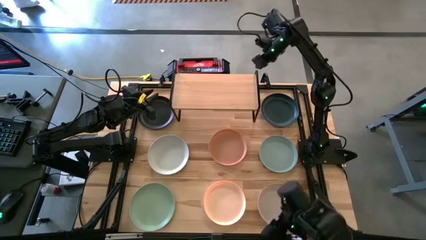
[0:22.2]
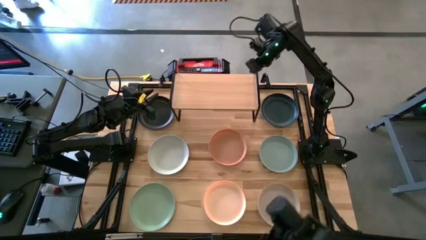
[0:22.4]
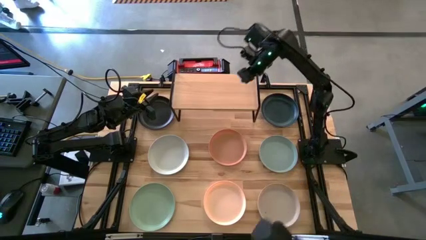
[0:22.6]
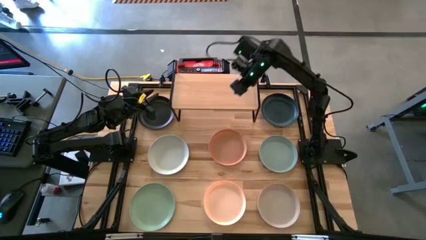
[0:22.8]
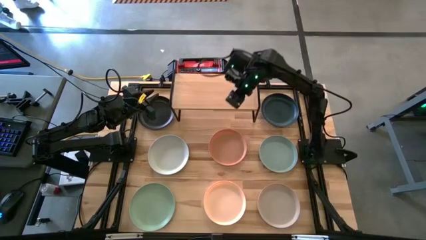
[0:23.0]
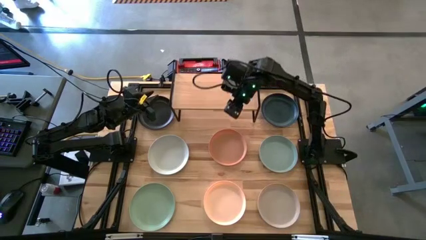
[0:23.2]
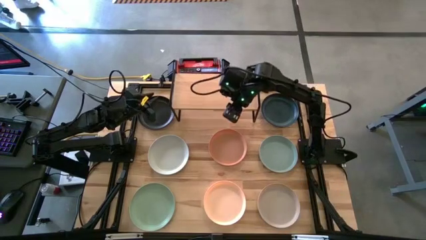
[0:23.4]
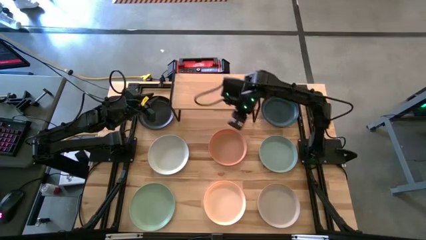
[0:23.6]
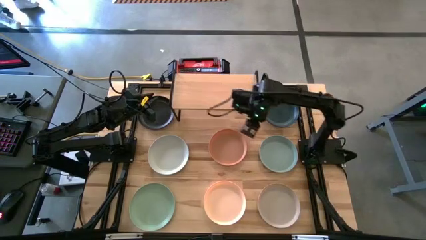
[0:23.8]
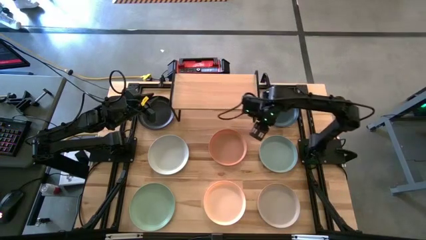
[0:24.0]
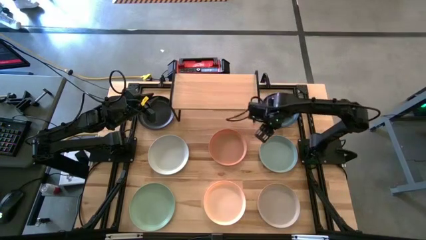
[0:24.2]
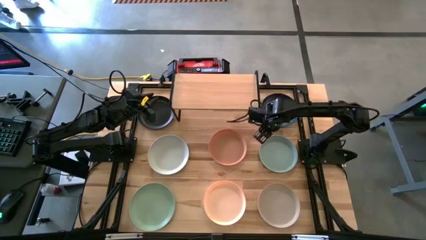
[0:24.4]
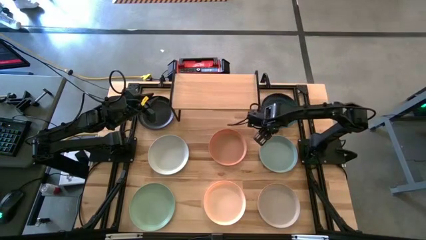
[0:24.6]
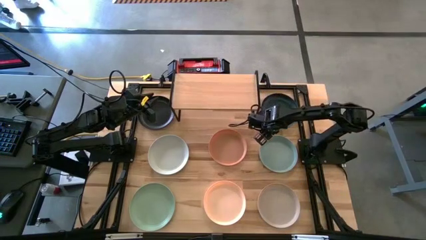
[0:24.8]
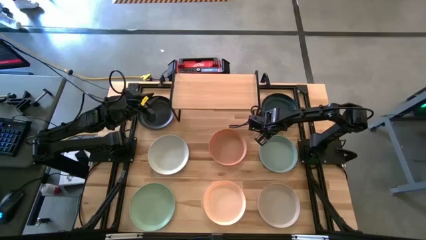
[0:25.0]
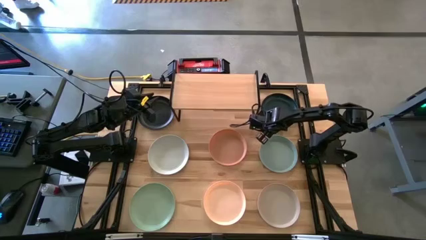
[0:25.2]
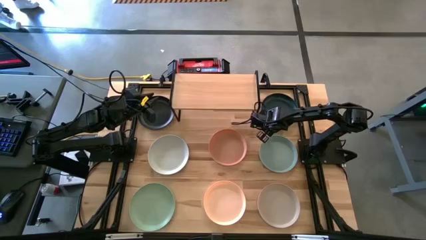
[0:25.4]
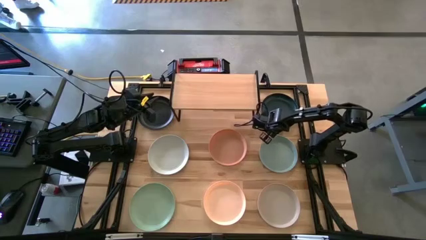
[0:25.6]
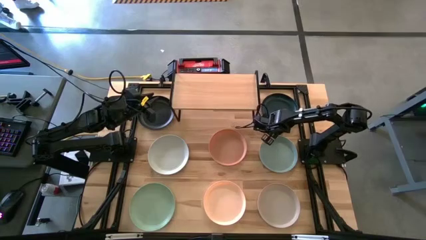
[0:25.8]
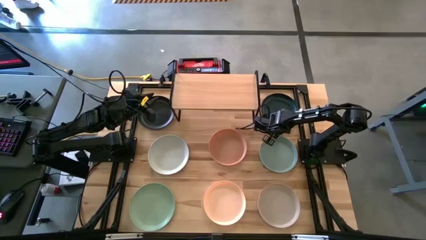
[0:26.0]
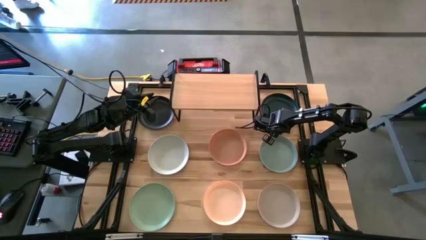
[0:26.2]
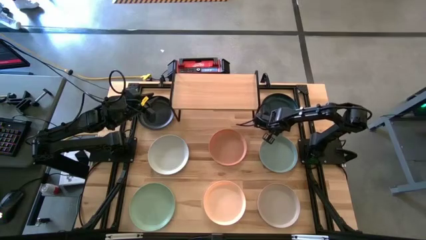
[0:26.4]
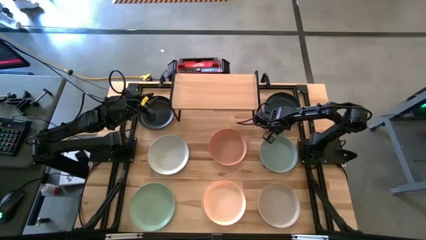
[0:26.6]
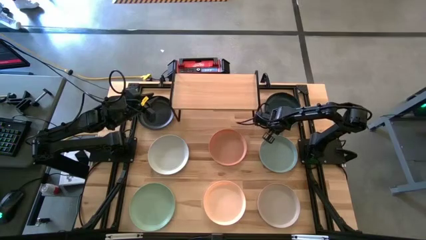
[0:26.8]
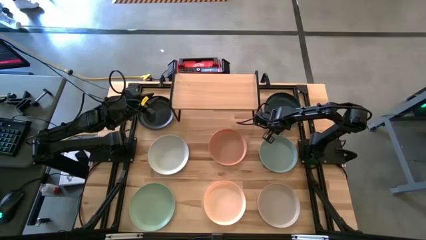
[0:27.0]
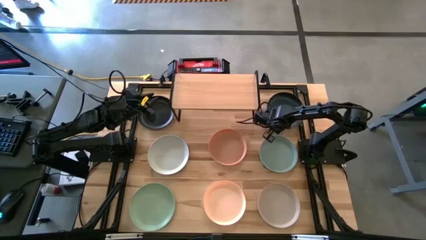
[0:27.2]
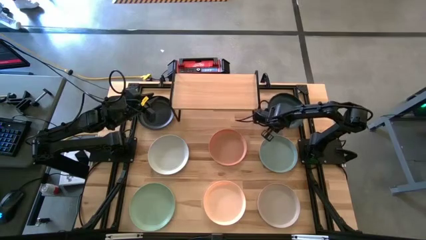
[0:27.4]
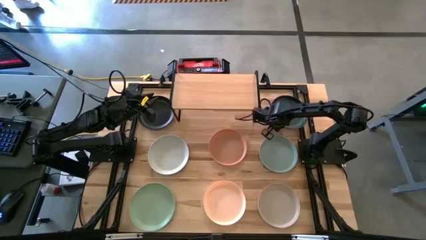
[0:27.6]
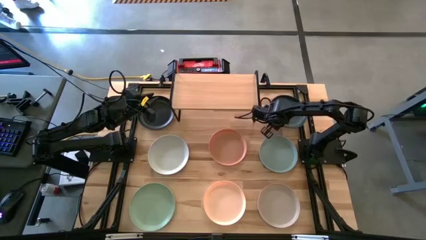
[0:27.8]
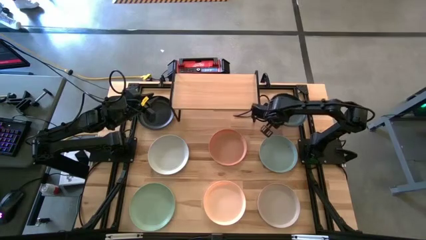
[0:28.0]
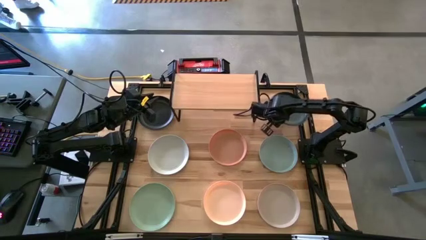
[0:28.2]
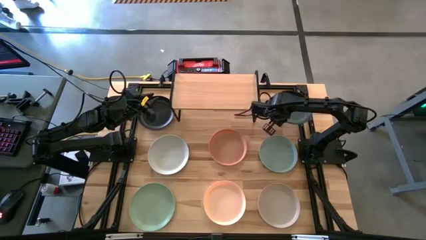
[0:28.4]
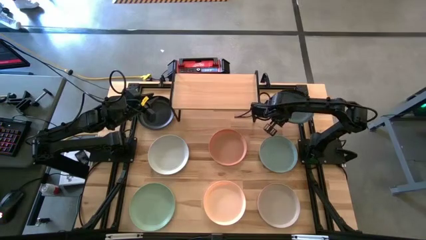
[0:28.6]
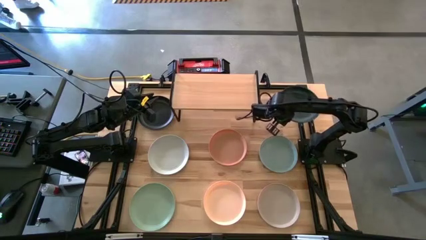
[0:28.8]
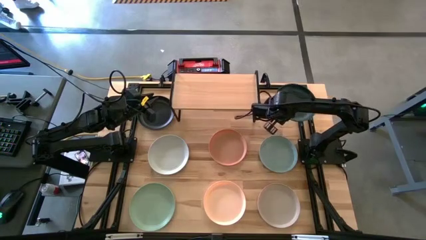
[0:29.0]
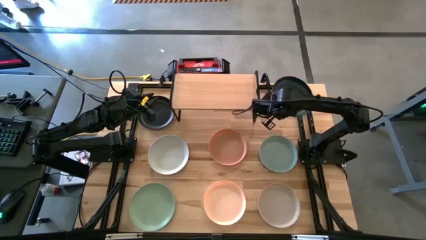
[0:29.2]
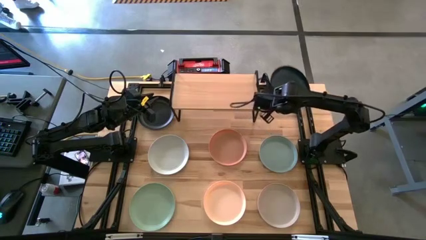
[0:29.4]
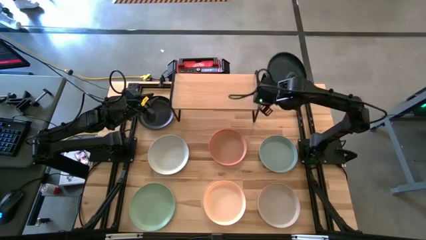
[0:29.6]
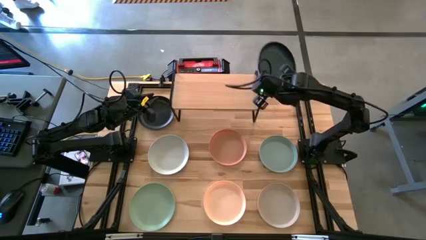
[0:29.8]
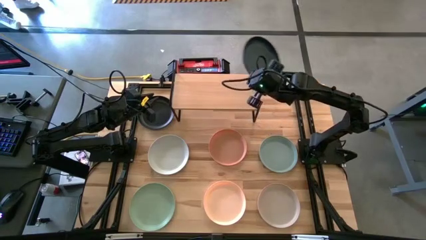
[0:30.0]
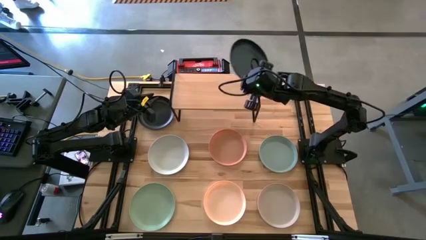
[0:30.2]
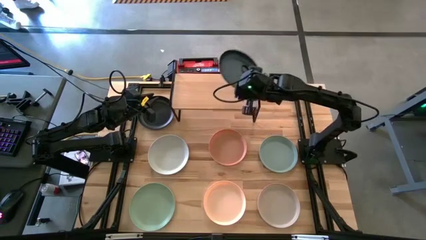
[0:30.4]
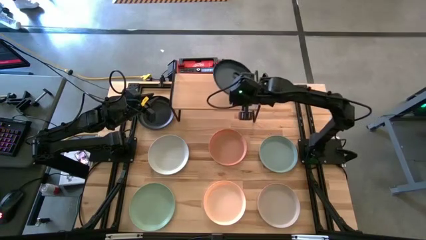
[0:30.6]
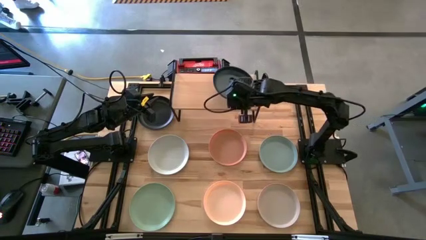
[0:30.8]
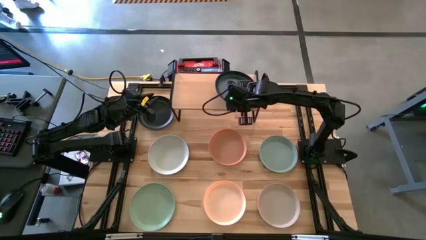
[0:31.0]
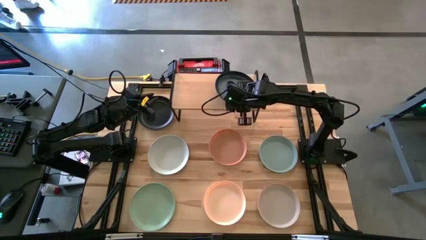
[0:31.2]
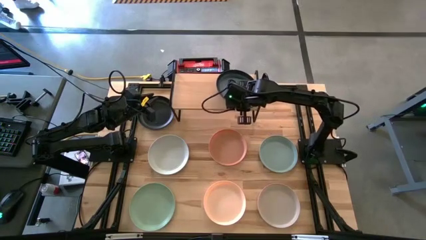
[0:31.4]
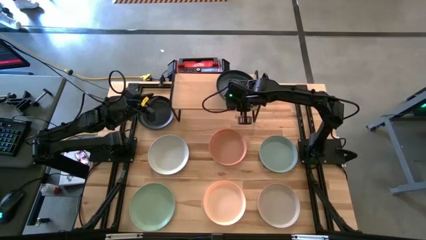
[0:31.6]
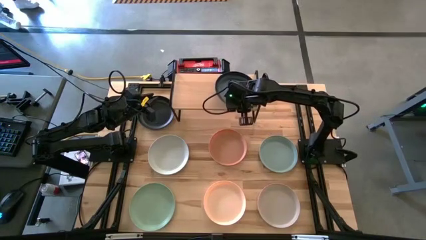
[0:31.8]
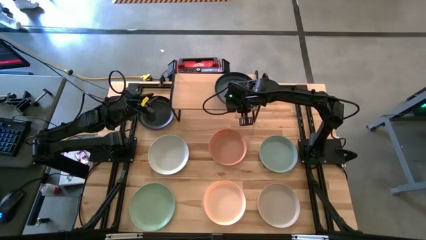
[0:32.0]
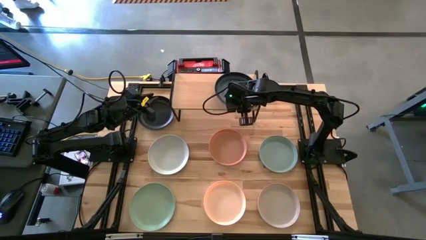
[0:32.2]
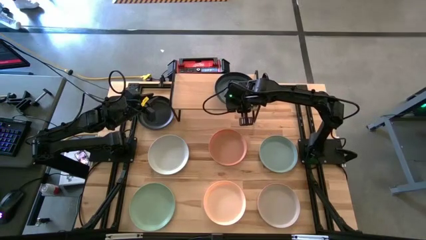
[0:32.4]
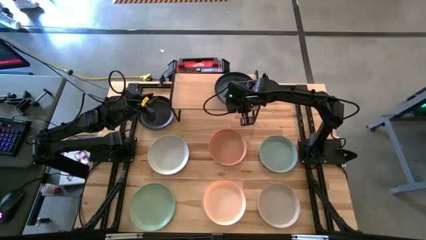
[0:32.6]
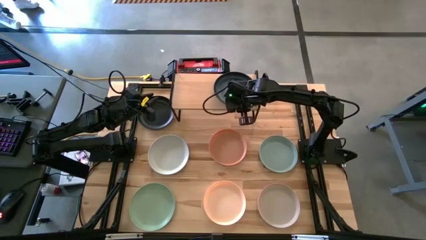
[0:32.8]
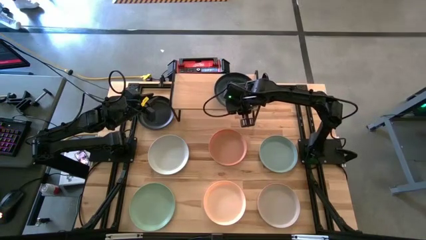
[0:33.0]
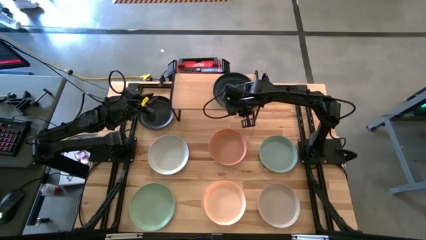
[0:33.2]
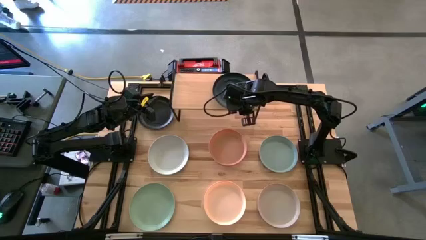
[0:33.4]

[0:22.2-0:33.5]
Task: Place and stack plates onto a shelf
Put the right black plate on the shelf
